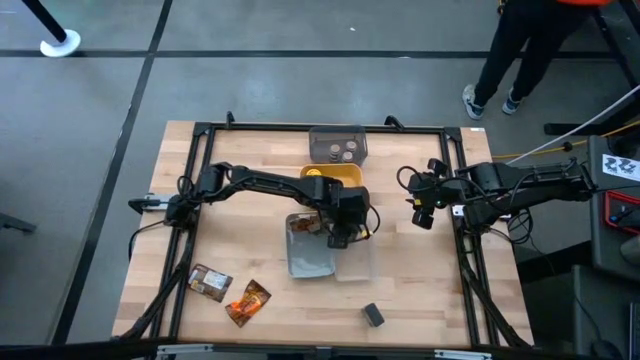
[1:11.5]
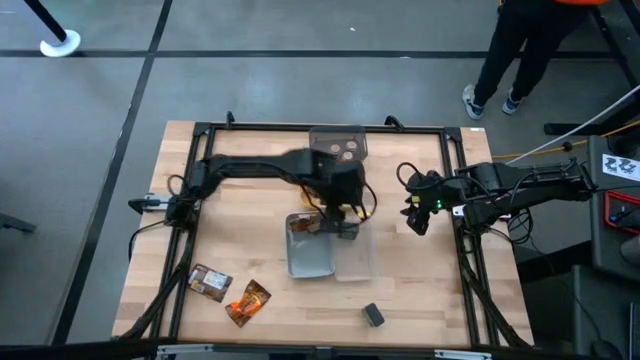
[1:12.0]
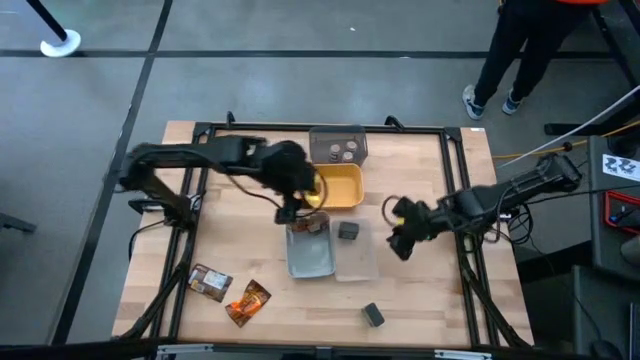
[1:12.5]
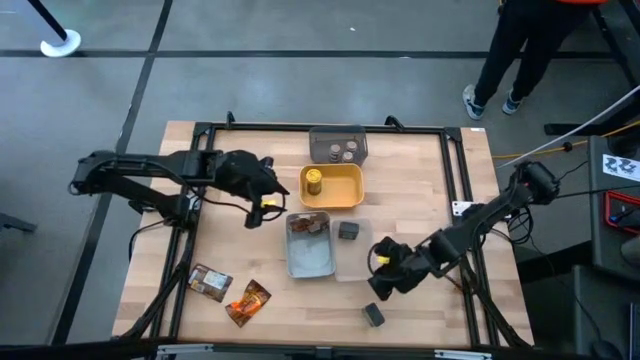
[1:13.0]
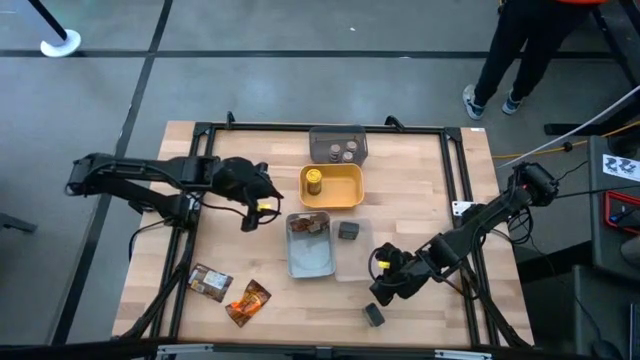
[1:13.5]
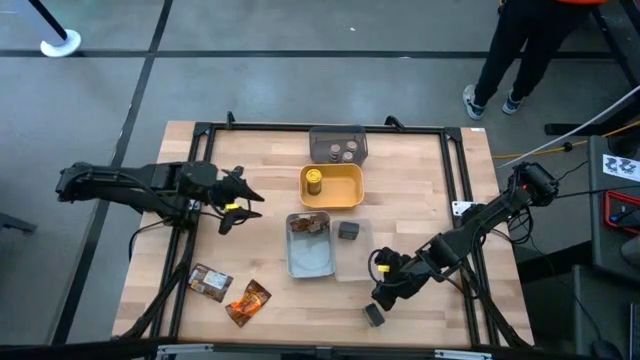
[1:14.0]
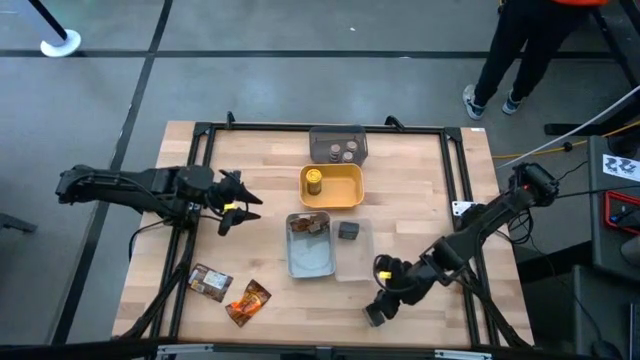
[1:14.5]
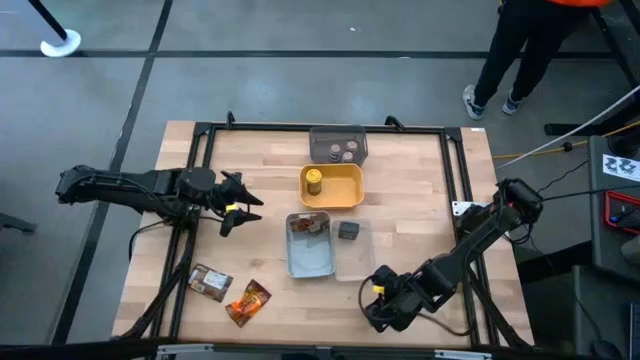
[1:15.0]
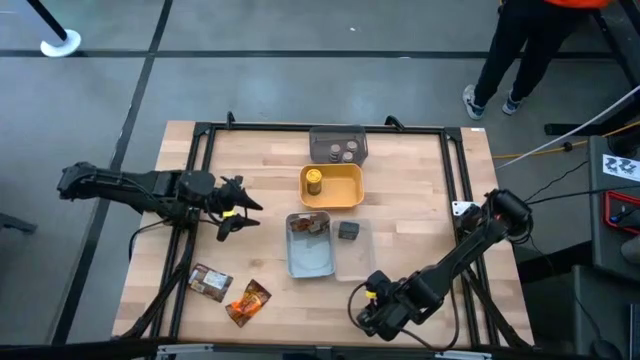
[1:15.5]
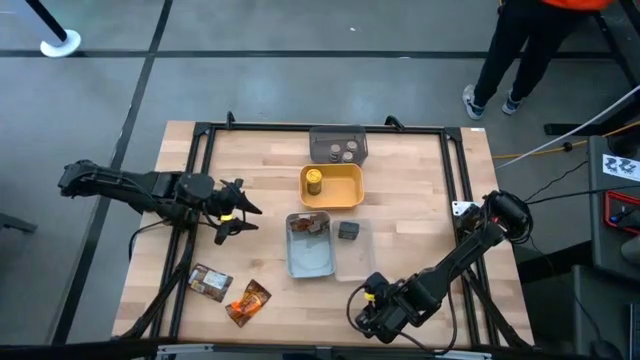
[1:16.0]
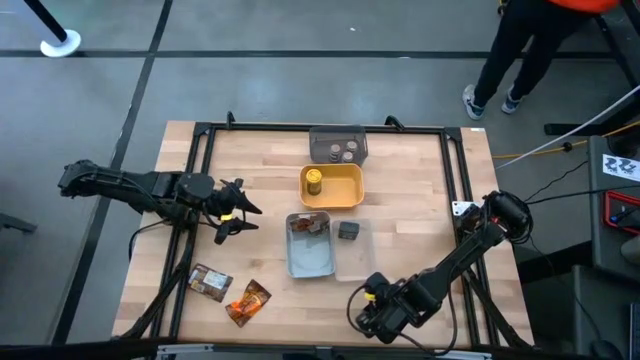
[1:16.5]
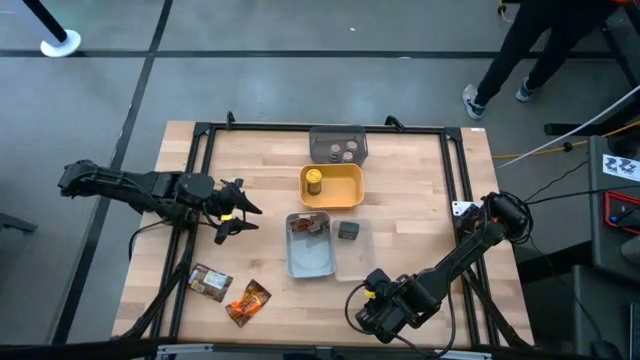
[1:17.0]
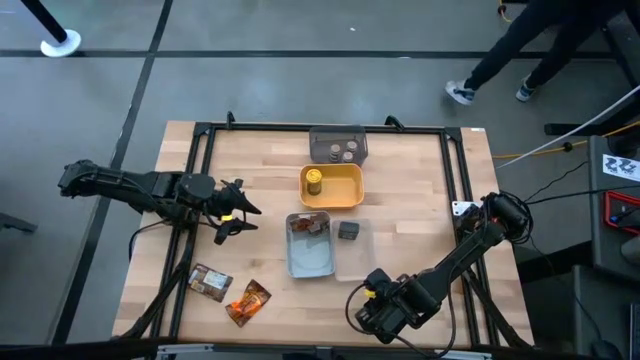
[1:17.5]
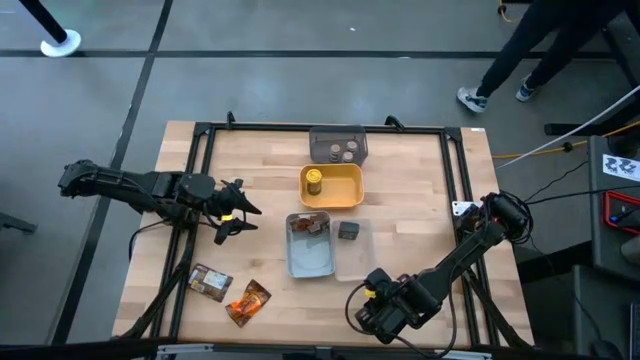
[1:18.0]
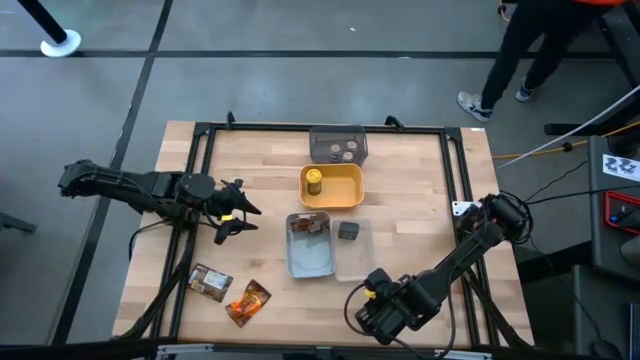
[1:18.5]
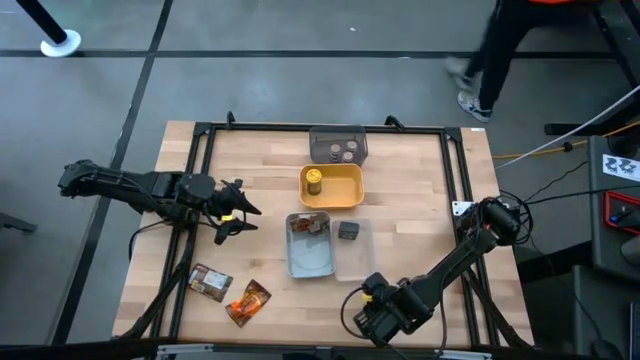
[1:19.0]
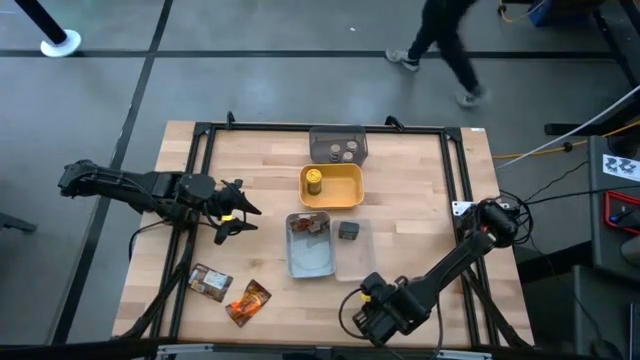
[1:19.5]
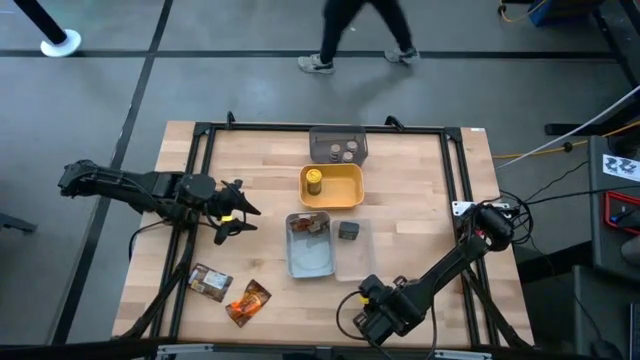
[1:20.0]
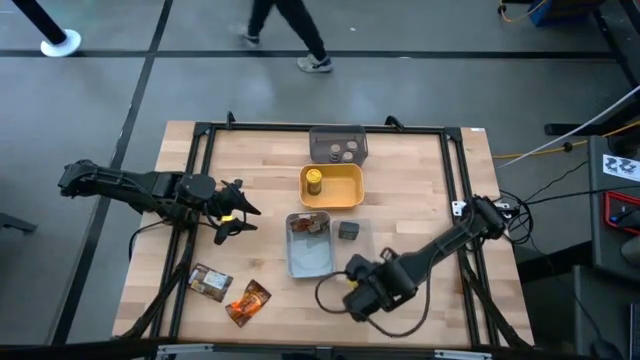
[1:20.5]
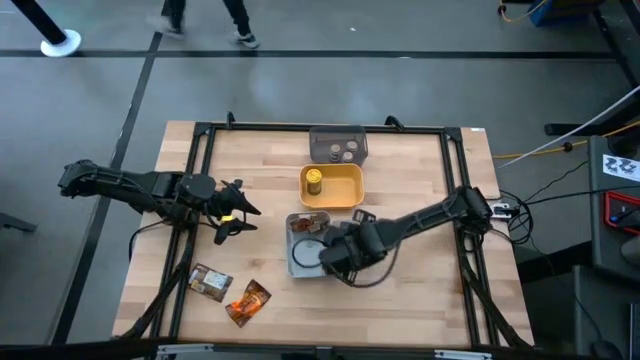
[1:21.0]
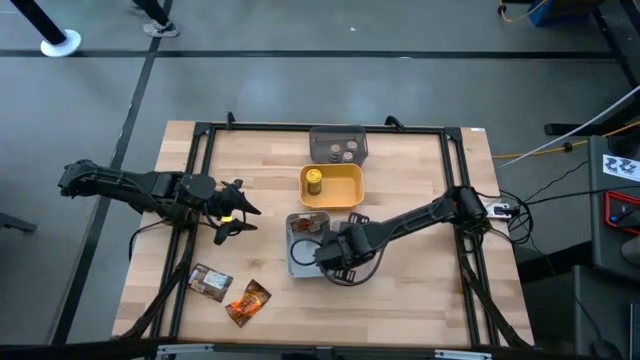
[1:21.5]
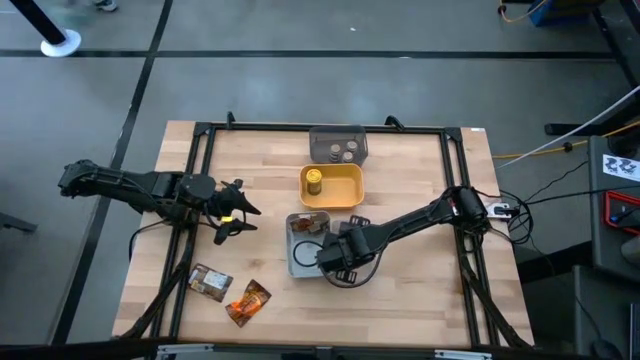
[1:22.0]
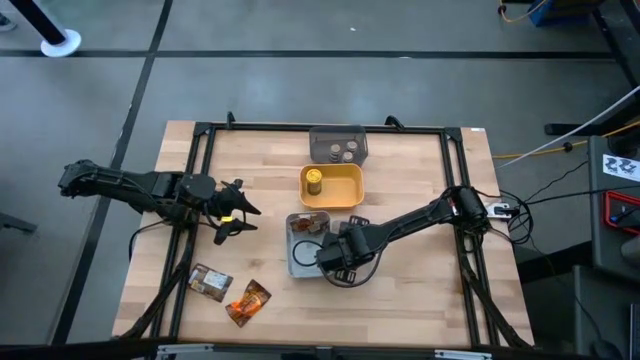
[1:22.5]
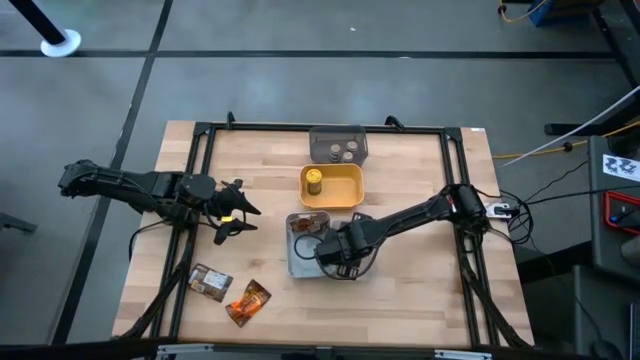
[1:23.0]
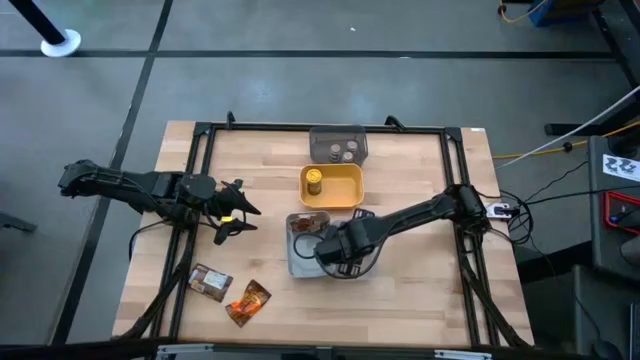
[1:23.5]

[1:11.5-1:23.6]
Task: Sort spices by type
Put the black seasoning can into the transparent bin

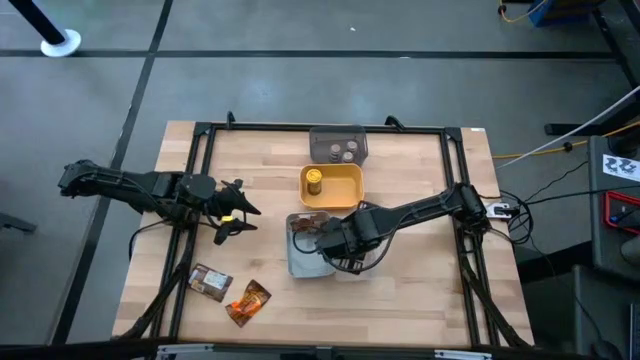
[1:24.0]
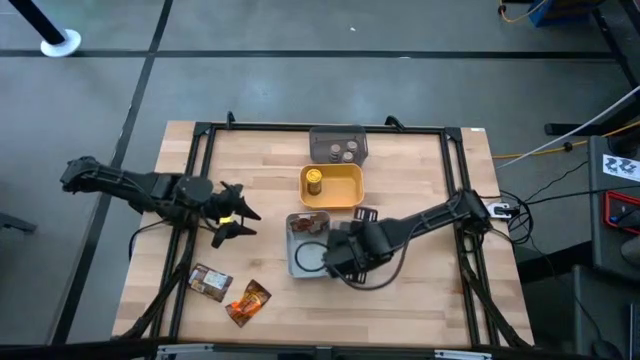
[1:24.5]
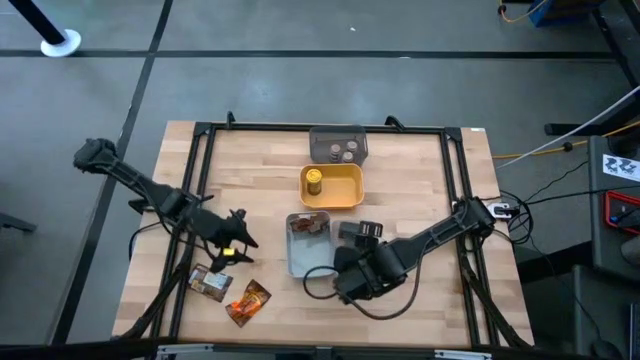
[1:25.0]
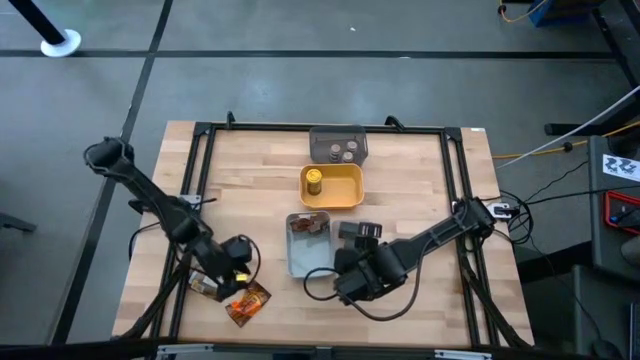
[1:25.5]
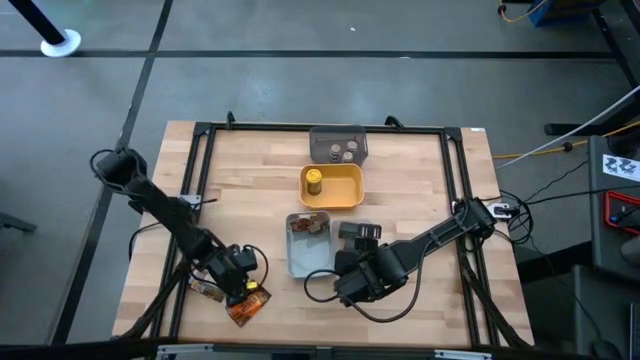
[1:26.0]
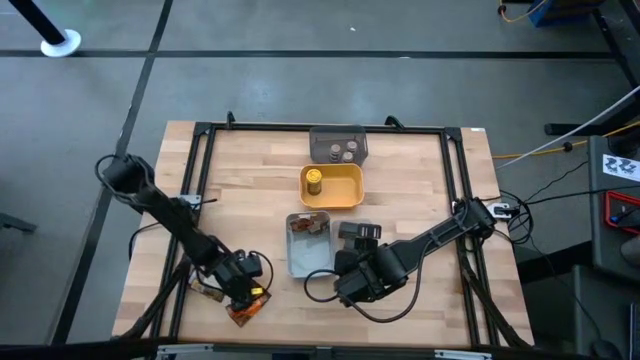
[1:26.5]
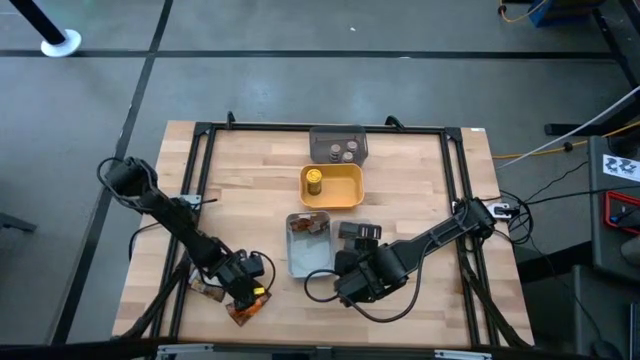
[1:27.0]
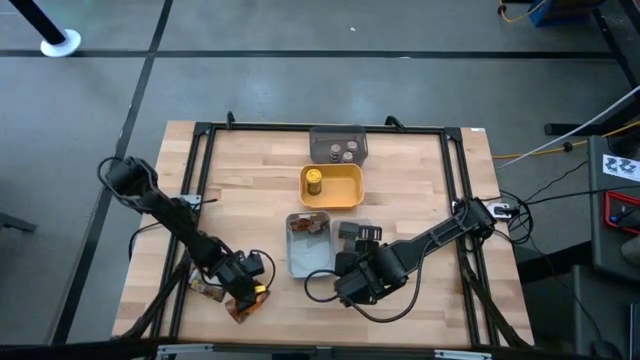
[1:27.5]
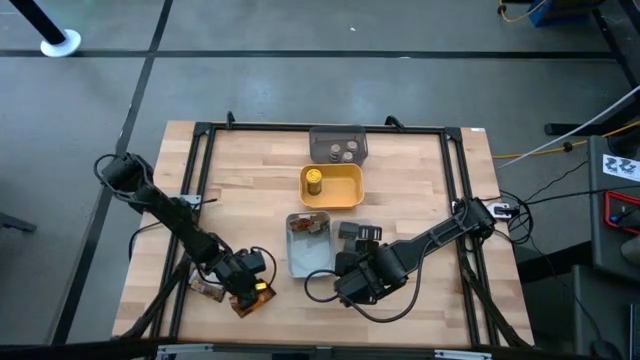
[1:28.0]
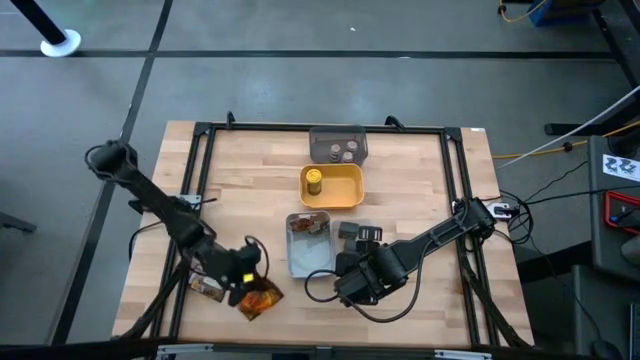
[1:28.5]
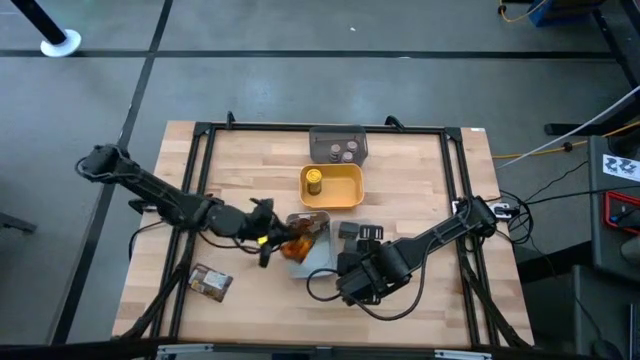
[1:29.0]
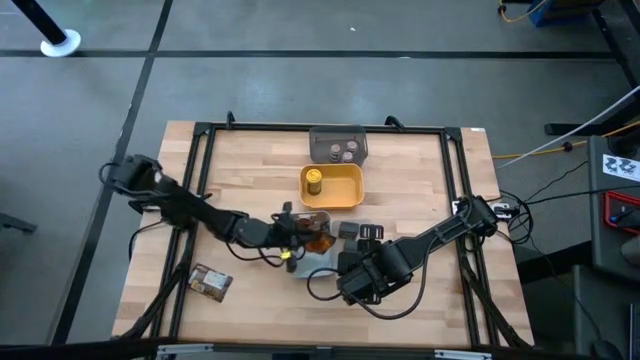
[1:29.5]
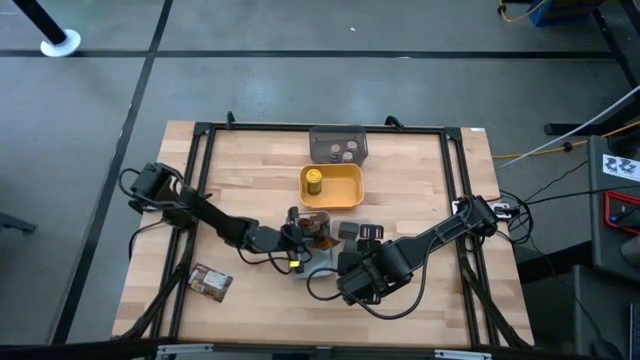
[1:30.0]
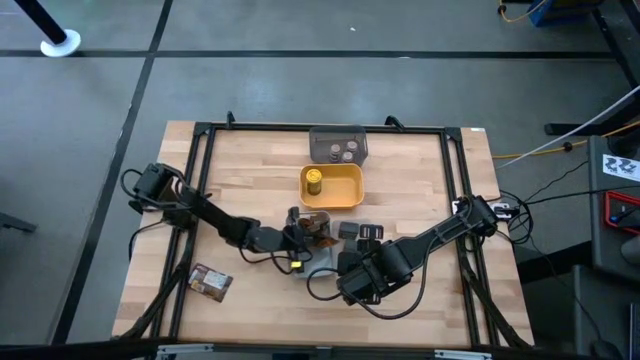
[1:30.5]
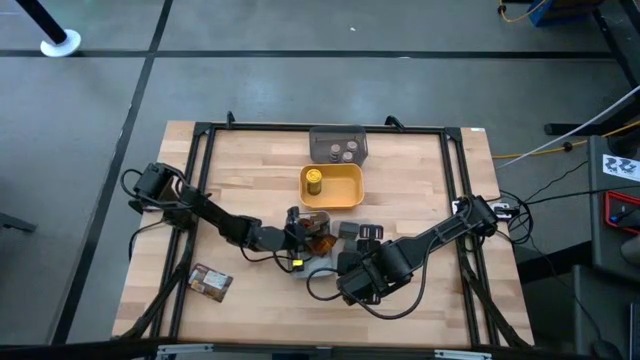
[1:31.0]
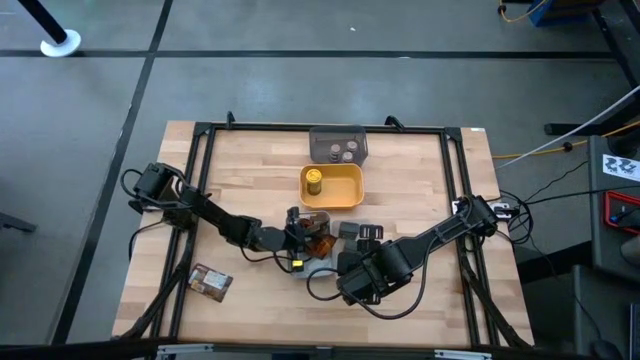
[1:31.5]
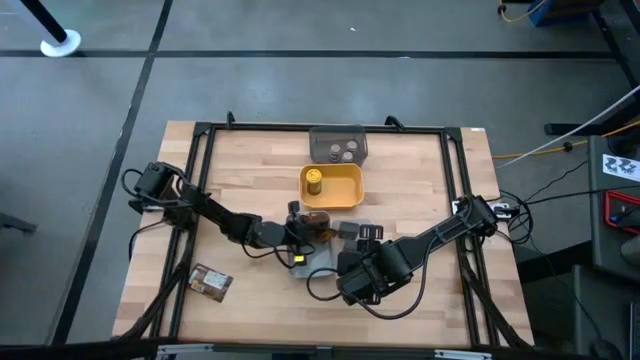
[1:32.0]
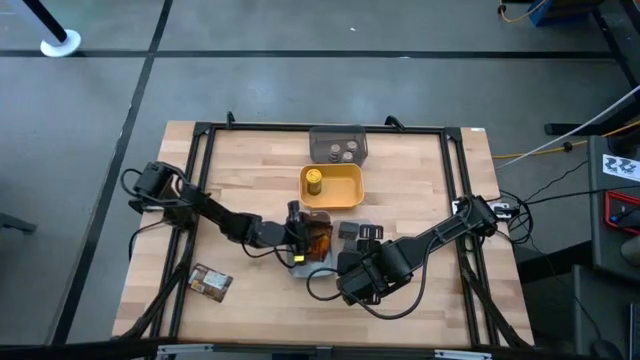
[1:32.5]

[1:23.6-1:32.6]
Put the right brown seasoning pack into the gray bin
